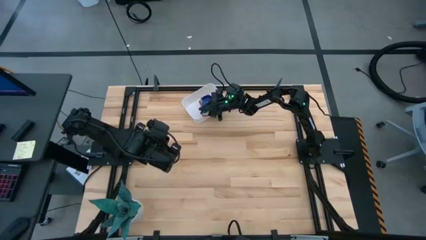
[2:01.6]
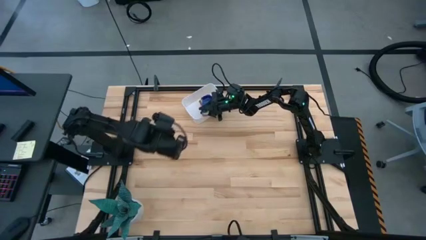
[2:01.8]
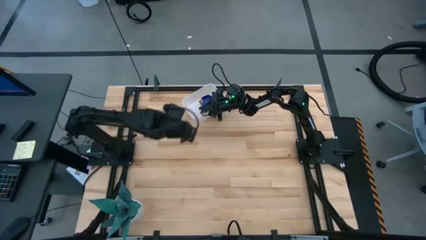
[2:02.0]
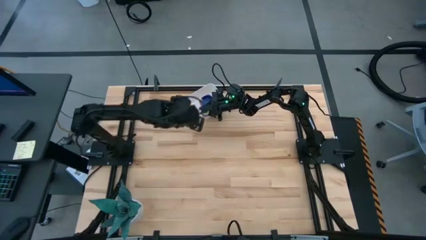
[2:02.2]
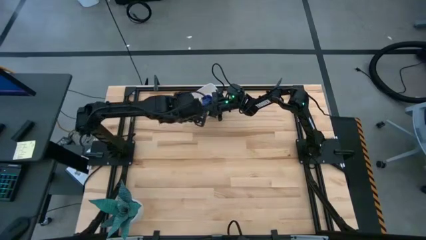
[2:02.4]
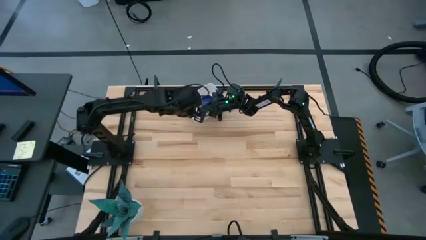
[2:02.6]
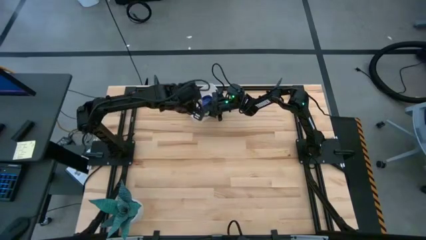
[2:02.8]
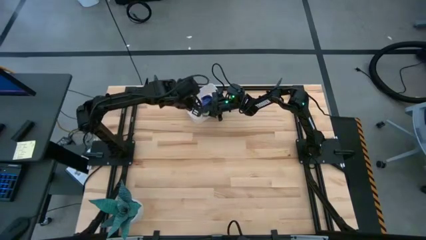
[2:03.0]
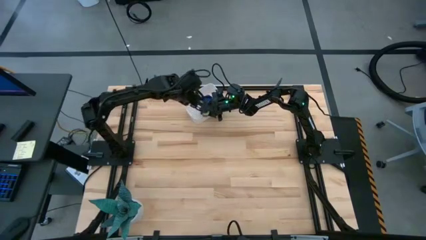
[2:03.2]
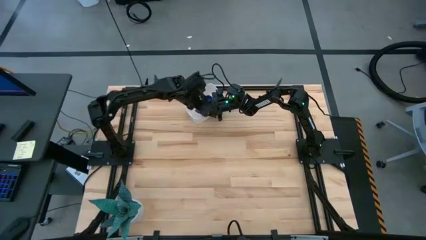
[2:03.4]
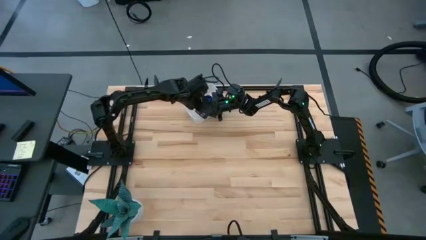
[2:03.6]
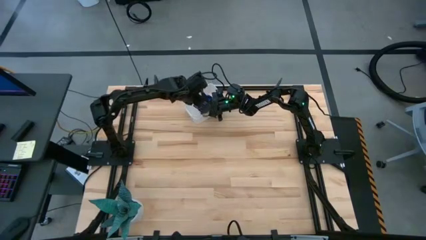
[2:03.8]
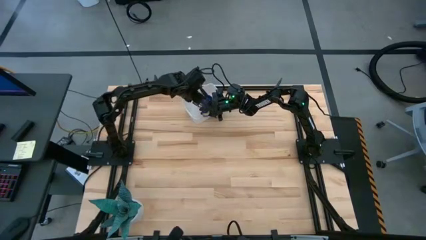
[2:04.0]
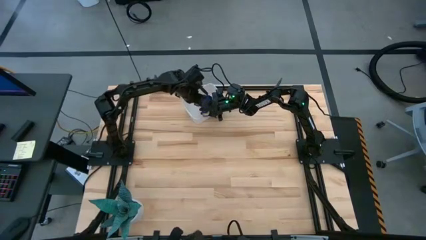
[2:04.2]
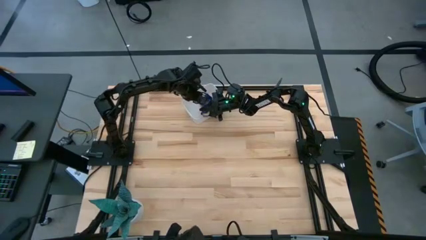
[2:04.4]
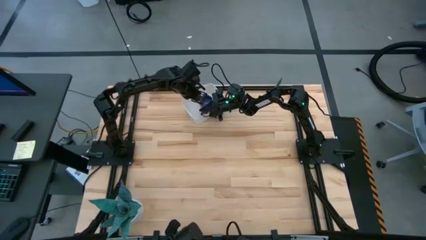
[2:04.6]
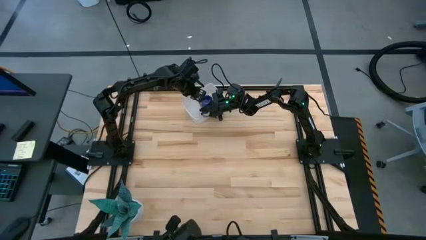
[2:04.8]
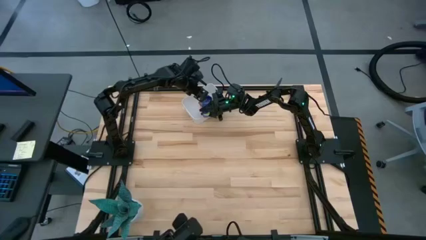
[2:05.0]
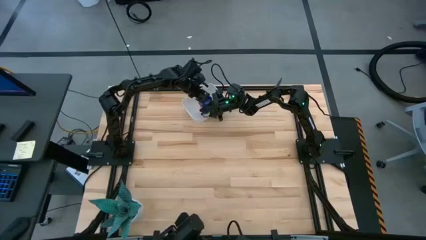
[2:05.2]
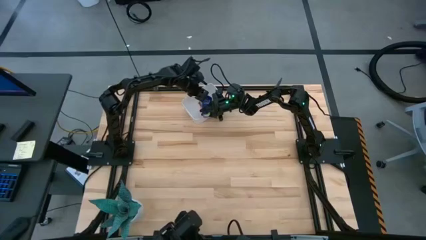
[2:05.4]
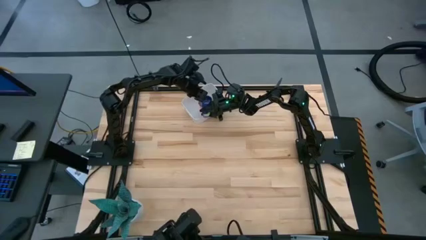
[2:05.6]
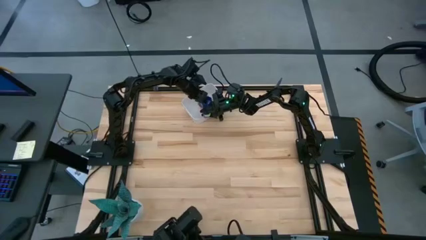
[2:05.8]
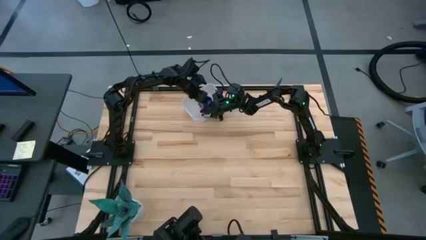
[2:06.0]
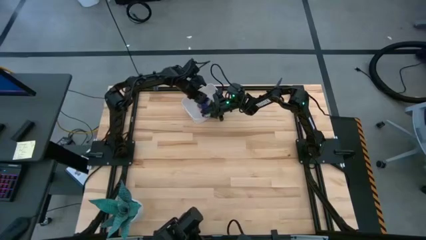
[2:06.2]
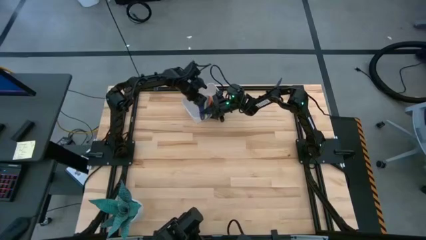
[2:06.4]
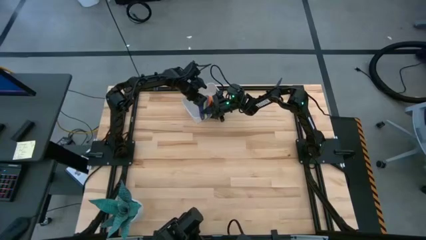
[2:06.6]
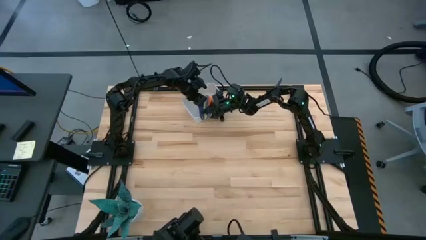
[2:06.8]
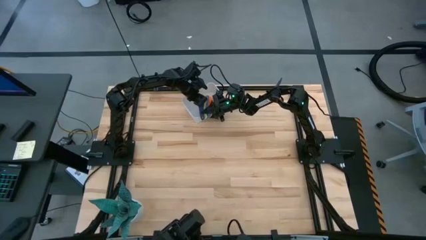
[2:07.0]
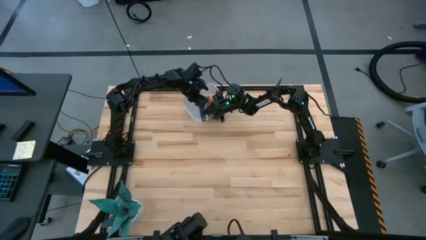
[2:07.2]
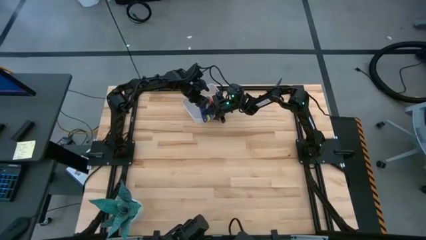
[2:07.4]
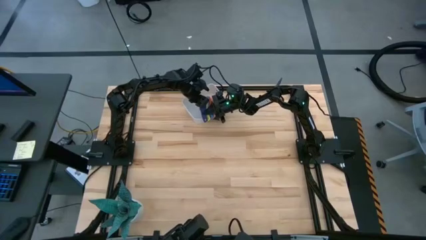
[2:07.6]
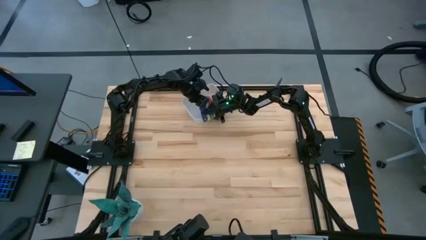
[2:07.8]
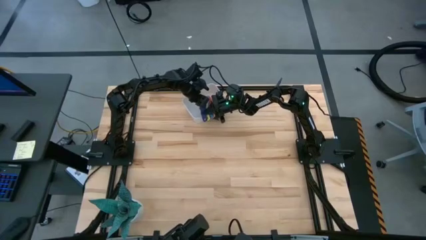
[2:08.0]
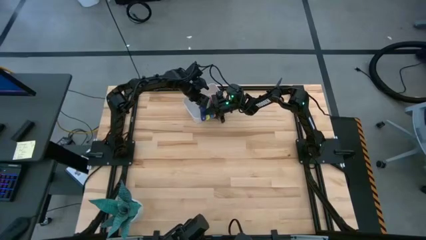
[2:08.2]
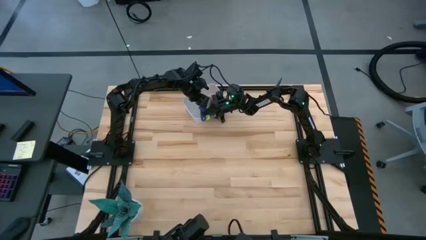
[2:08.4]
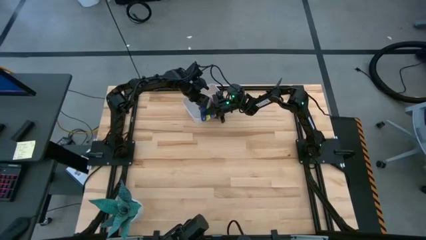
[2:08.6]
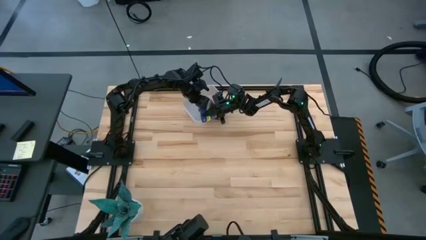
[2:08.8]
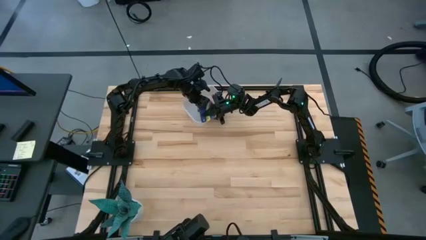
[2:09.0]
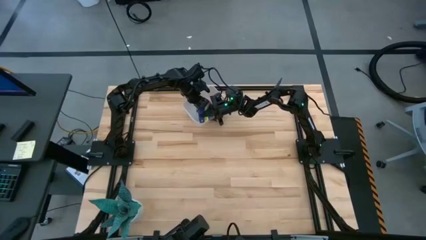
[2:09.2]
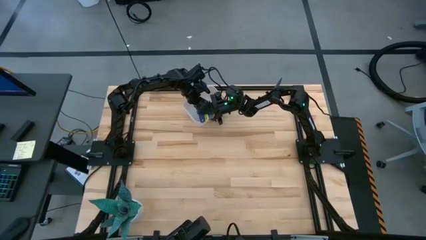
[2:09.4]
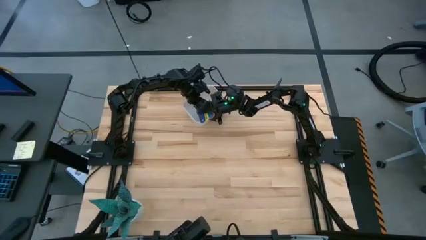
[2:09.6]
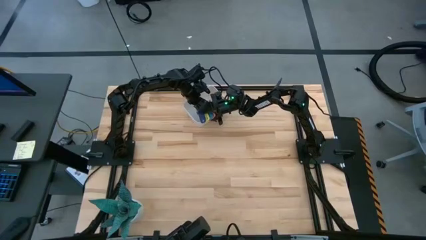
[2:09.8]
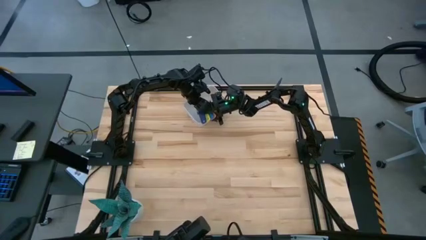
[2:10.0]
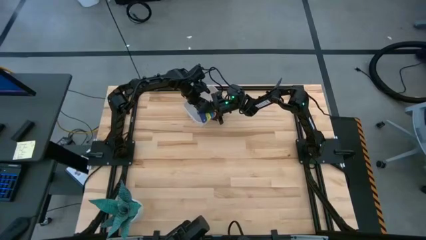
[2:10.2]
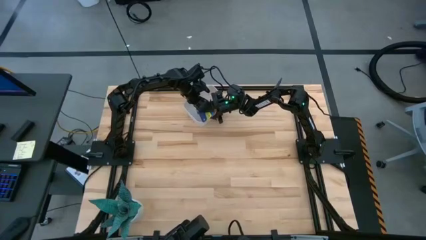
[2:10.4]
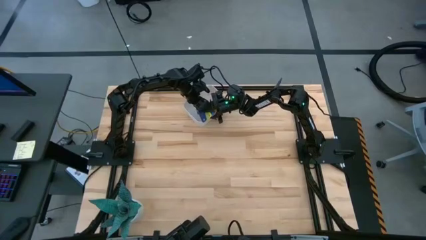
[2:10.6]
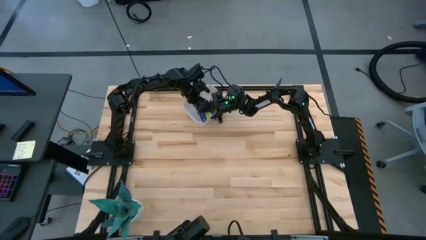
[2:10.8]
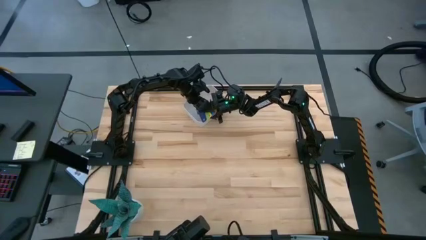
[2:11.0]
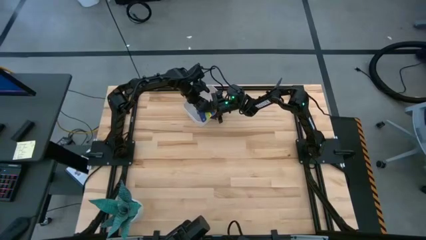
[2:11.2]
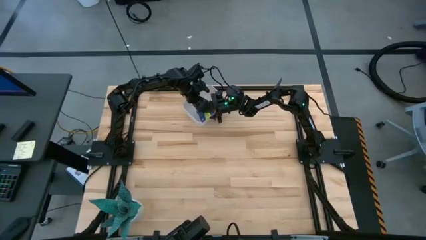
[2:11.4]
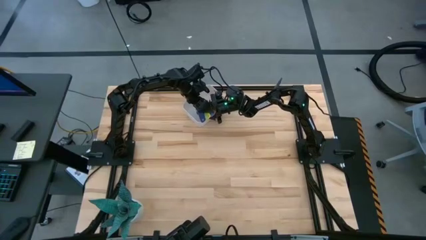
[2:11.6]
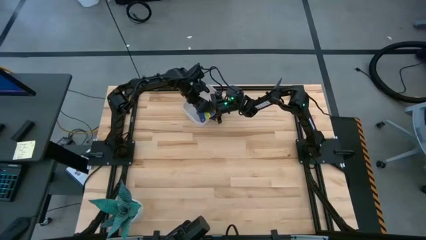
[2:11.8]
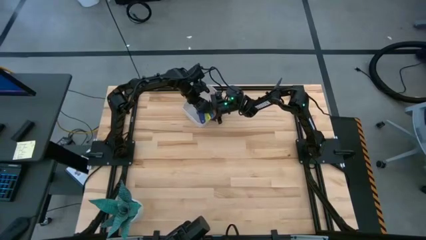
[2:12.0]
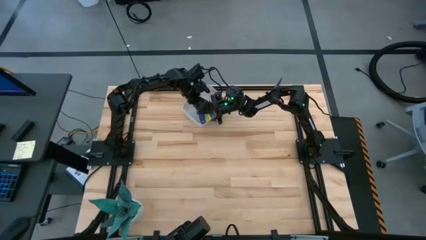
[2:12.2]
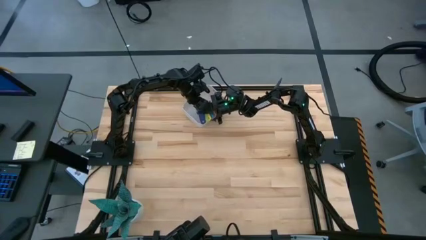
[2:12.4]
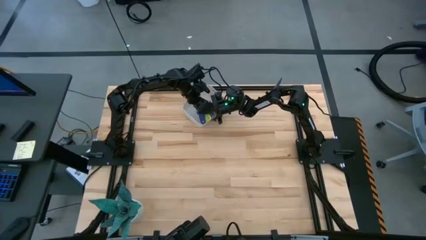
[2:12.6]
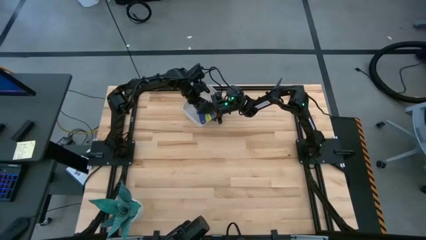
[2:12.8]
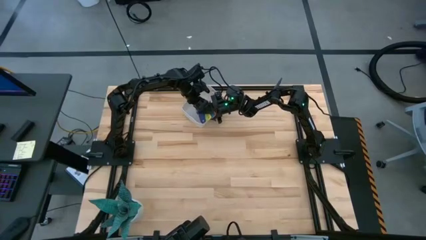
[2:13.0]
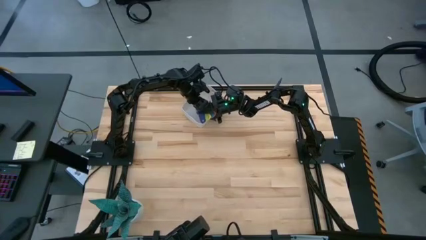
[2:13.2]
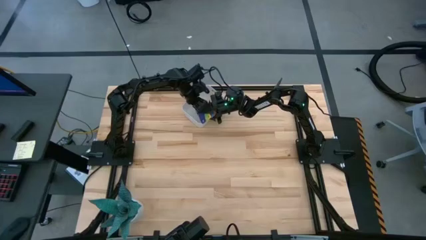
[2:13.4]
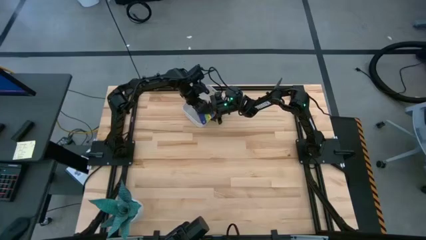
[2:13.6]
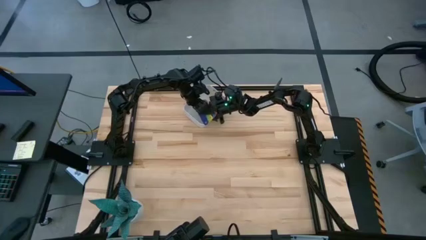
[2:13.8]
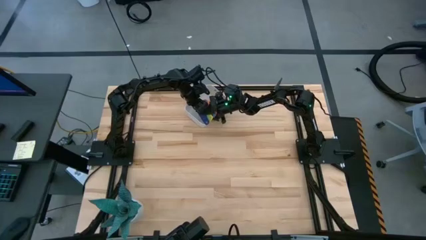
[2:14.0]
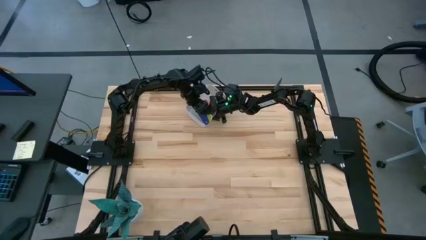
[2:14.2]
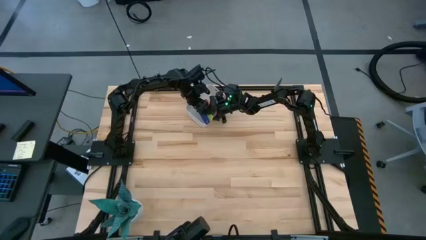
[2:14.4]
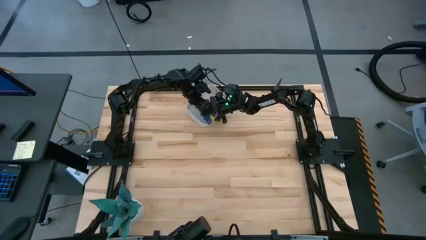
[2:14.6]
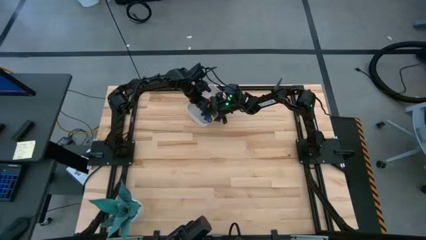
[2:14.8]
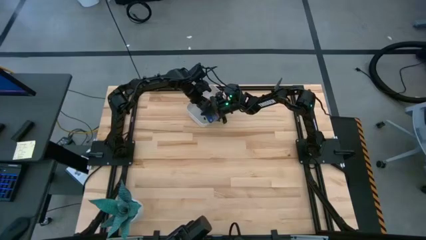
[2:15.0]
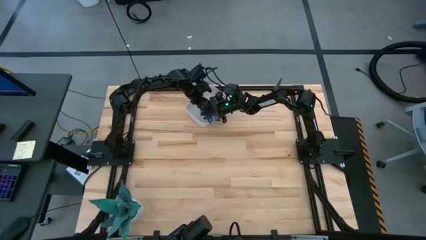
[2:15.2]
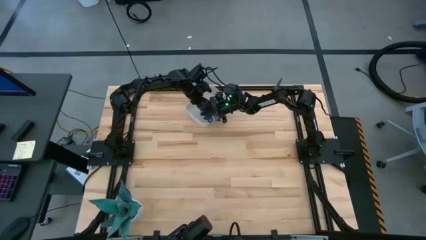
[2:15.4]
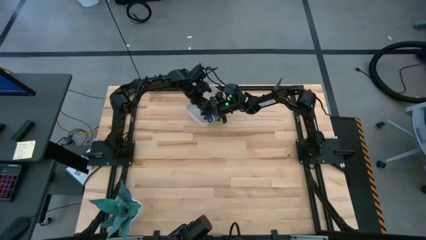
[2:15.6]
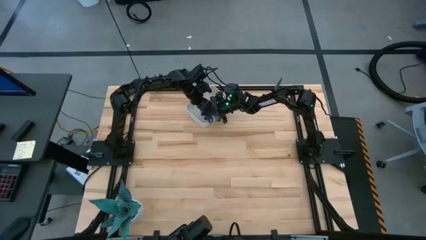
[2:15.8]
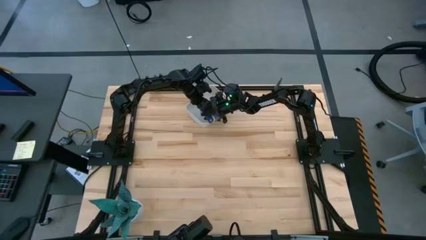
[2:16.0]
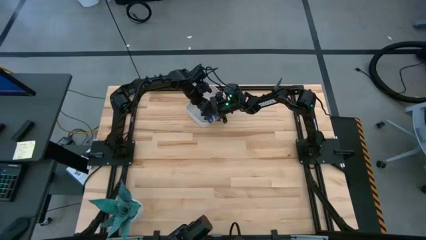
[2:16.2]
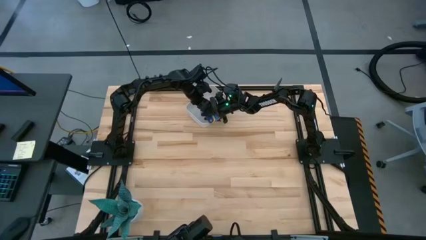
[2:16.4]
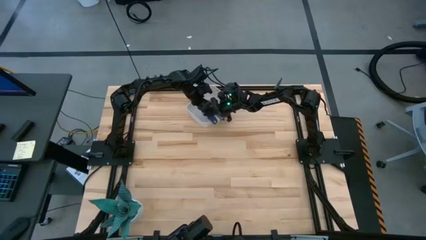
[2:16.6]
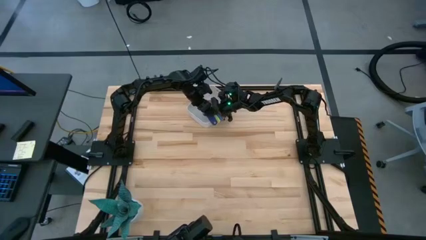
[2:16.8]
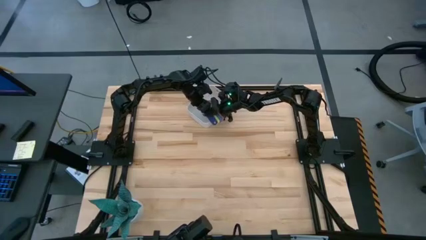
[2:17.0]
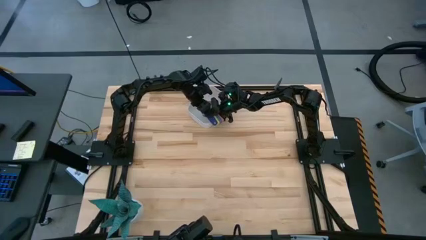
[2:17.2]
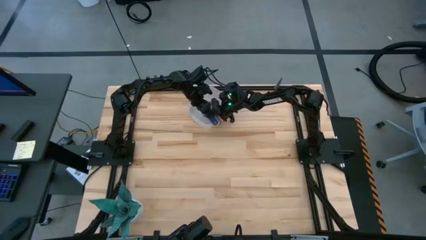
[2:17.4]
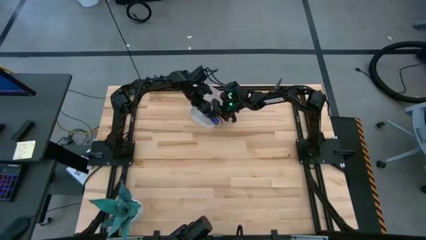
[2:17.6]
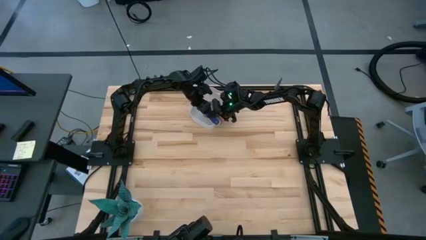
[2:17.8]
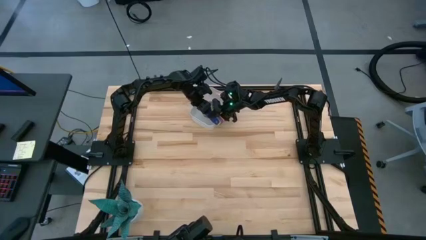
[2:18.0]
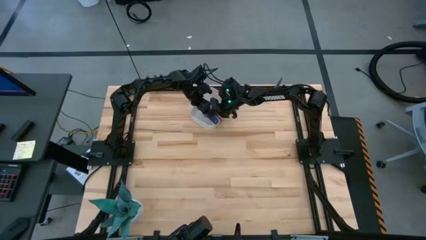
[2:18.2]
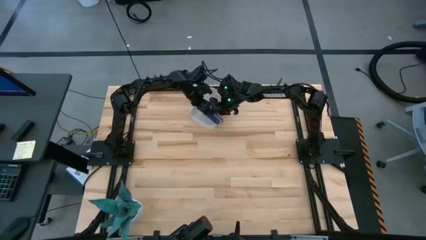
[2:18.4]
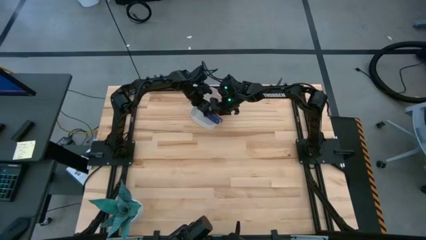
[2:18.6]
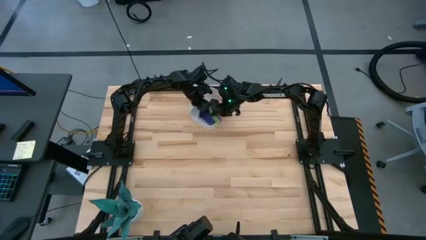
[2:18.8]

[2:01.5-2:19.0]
Task: Nest measuring cups in basket
Put the stacked measuring cups into the white bin
